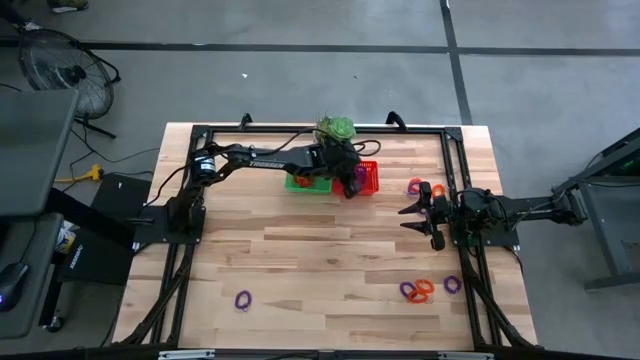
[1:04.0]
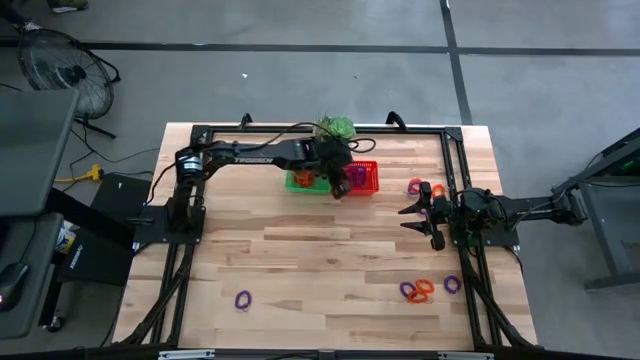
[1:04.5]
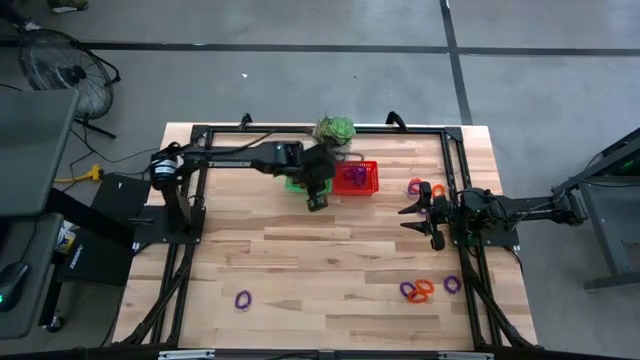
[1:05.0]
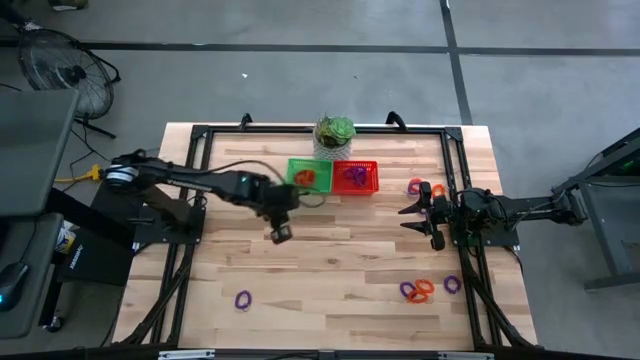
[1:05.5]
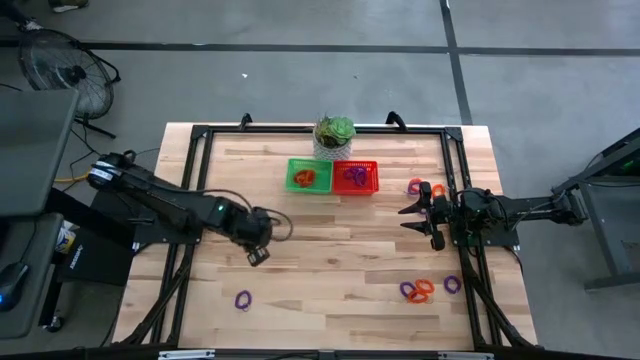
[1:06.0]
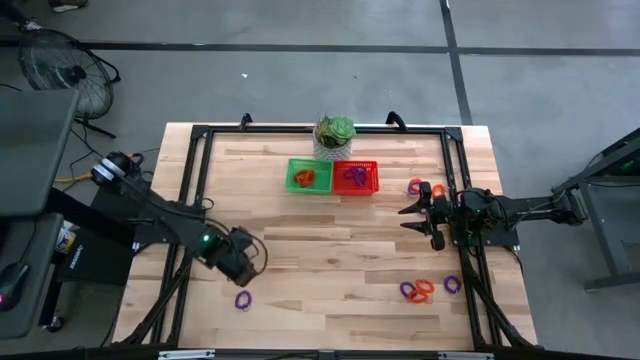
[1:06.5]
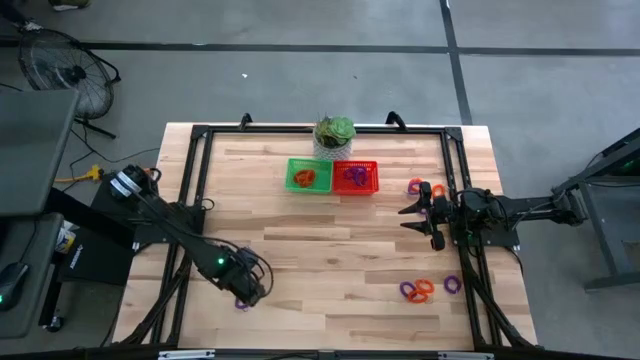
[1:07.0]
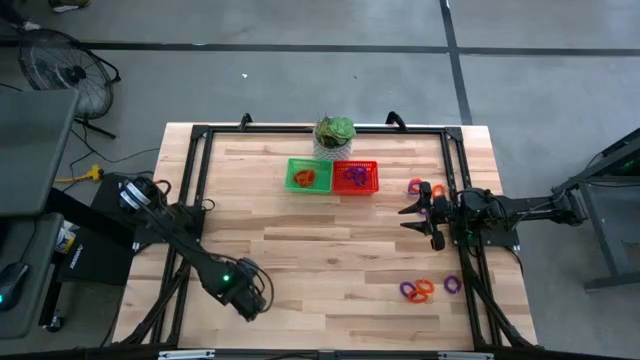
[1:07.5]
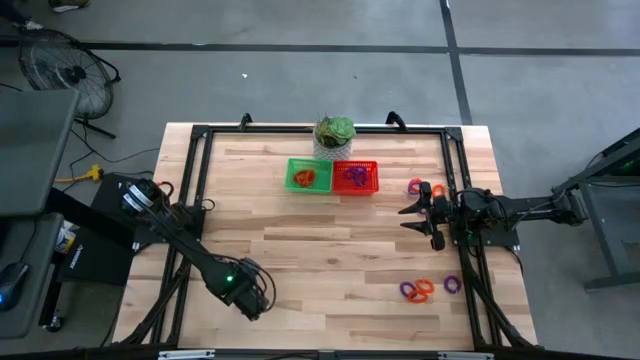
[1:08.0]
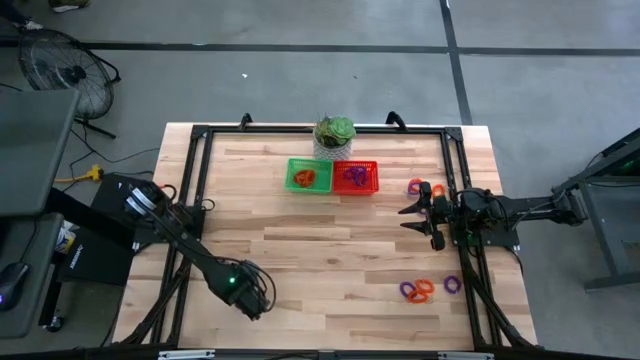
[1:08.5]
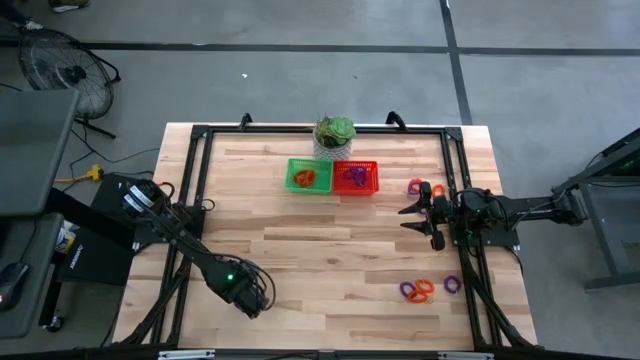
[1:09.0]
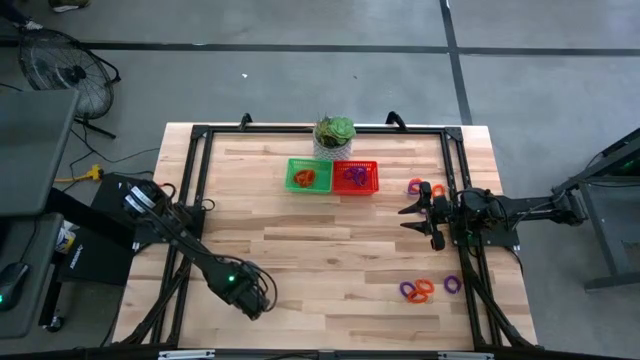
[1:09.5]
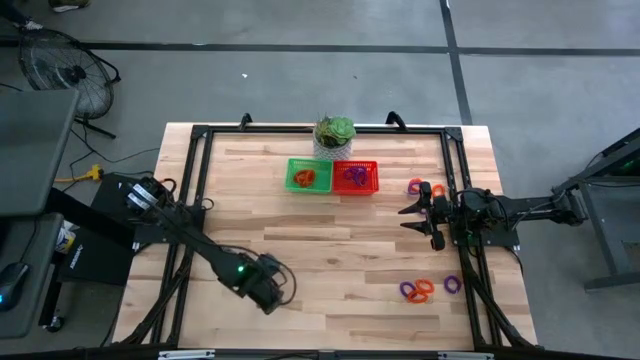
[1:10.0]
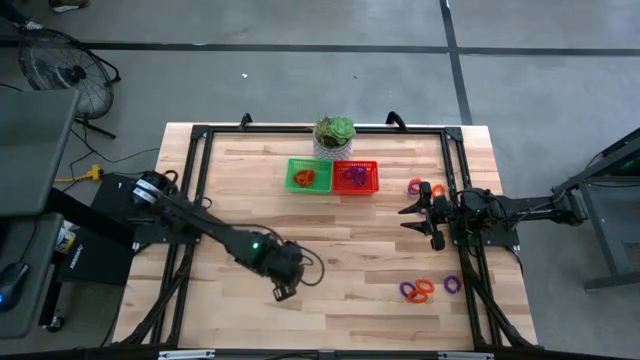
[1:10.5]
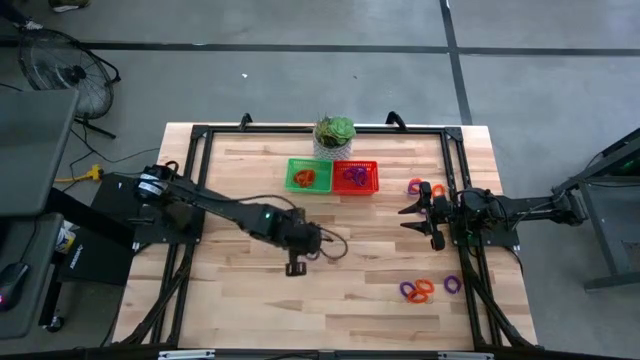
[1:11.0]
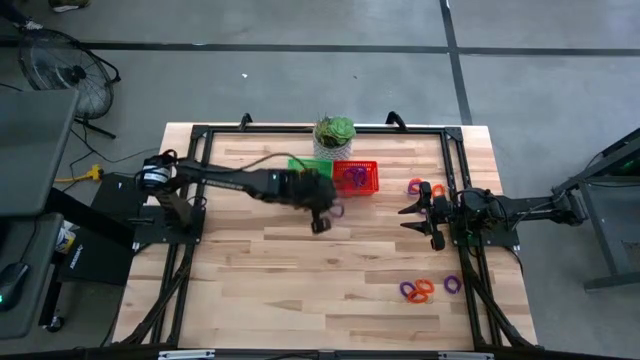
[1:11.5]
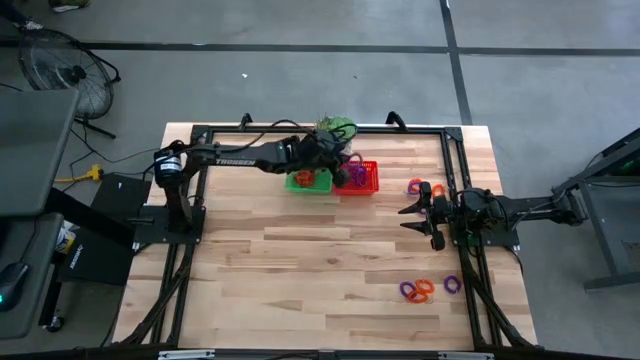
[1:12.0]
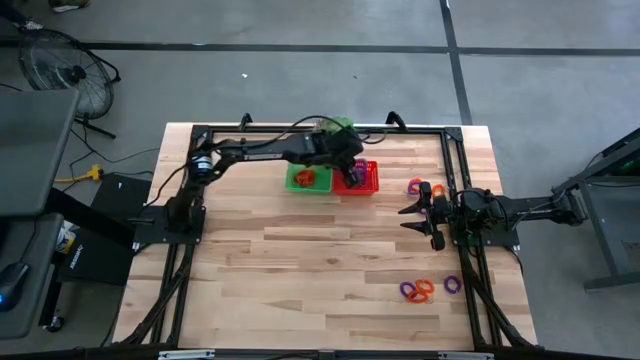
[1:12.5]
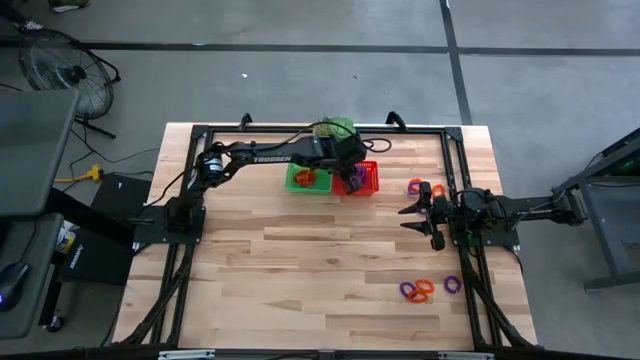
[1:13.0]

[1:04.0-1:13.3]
Task: Sort spring keychains
Put the purple spring keychain into the orange bin

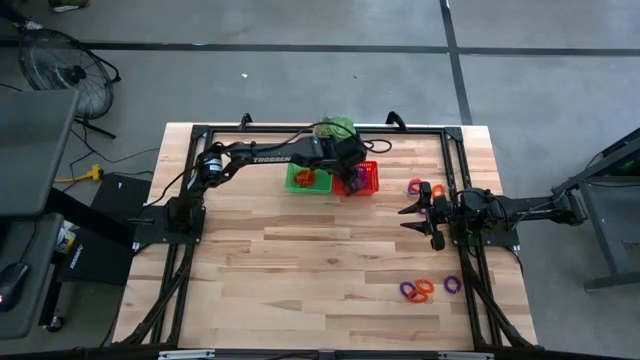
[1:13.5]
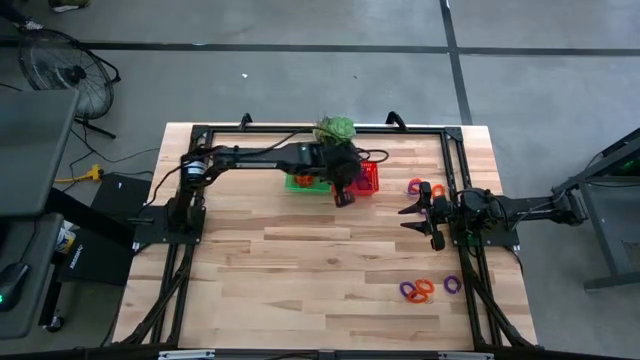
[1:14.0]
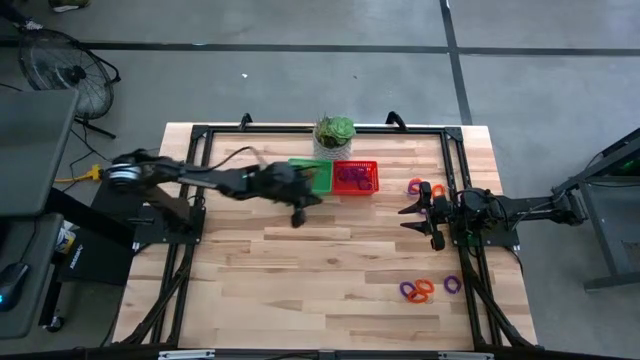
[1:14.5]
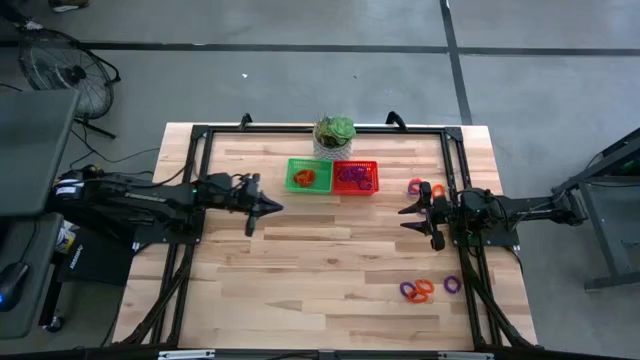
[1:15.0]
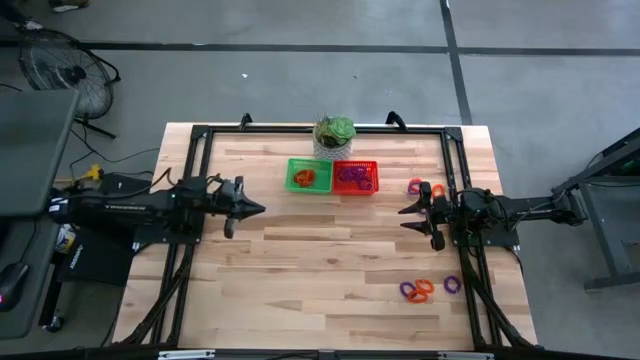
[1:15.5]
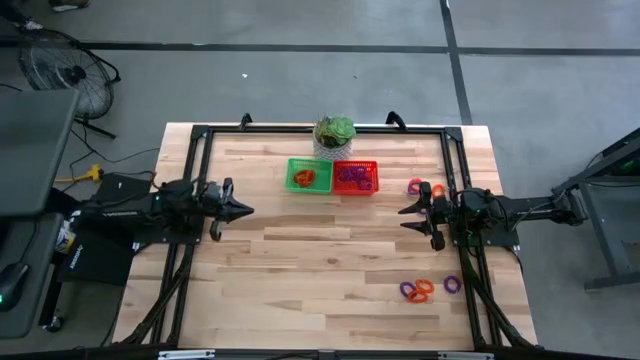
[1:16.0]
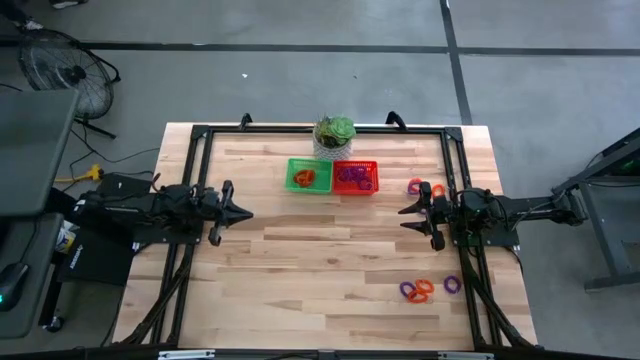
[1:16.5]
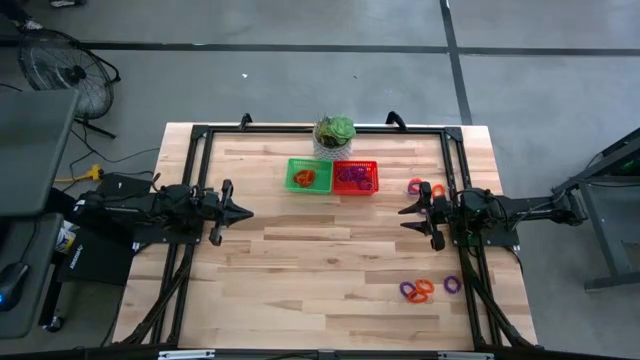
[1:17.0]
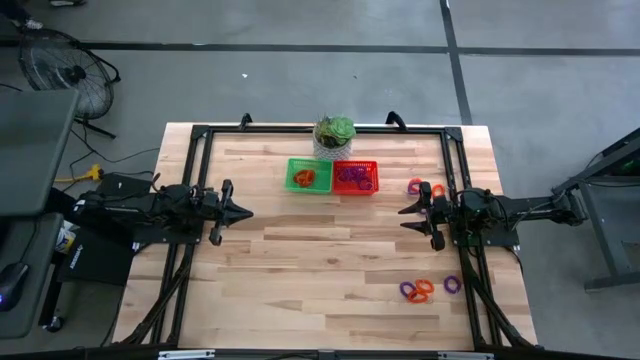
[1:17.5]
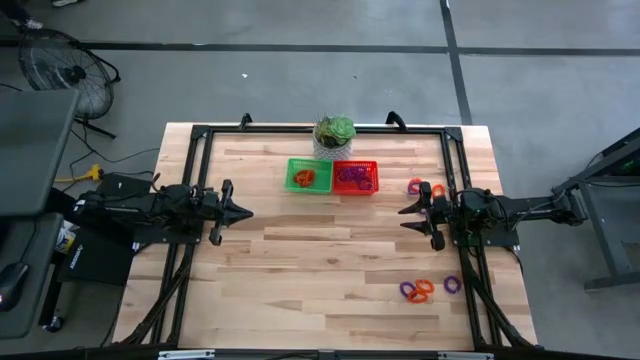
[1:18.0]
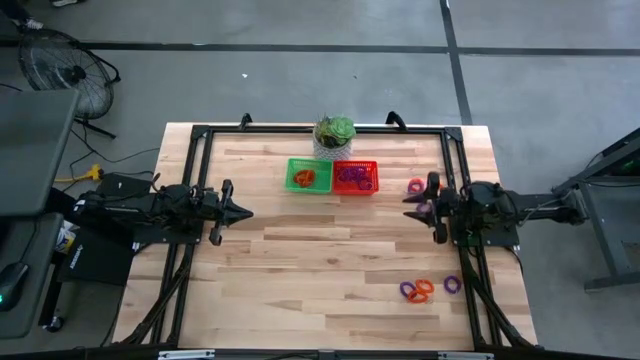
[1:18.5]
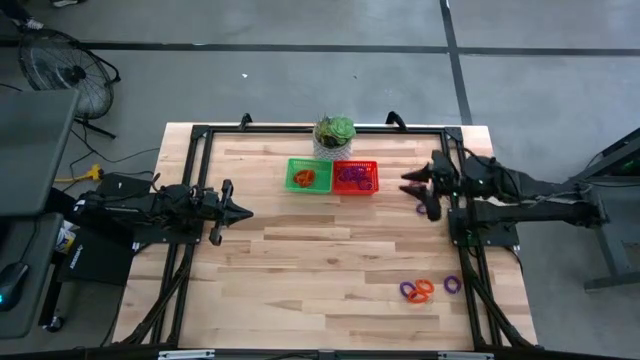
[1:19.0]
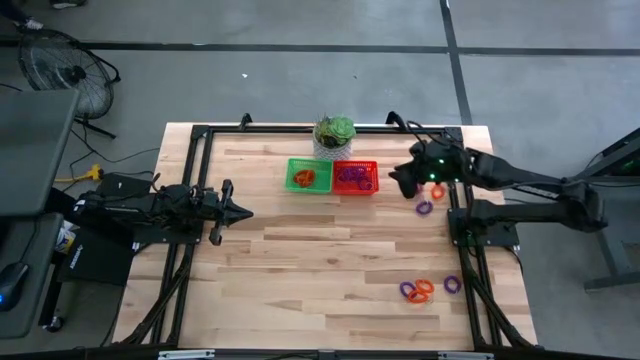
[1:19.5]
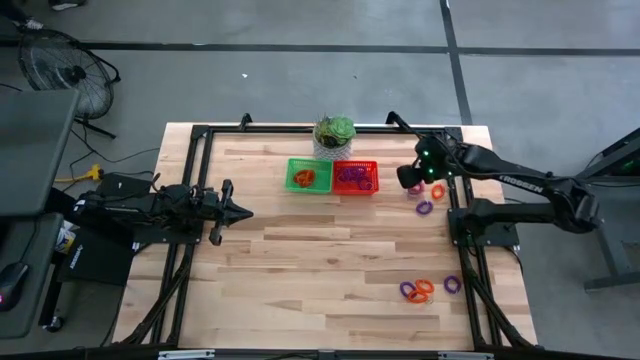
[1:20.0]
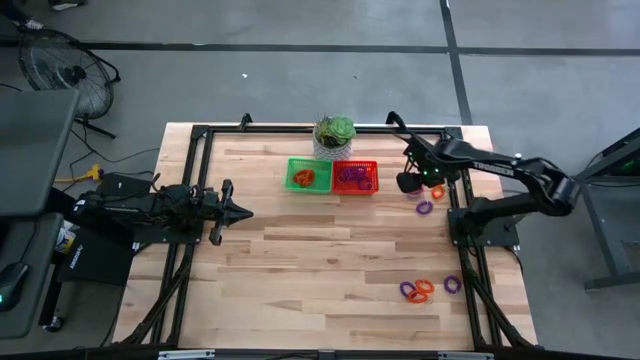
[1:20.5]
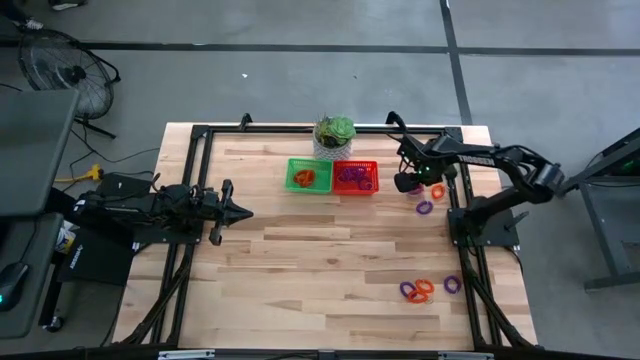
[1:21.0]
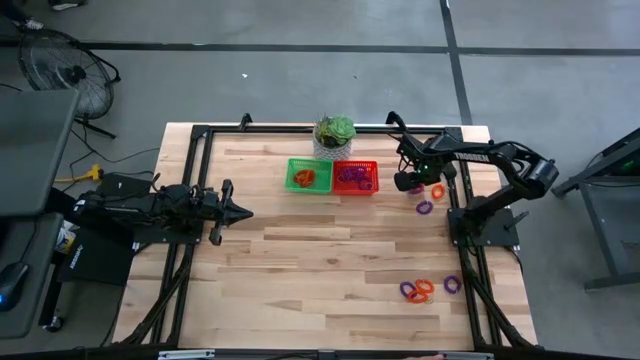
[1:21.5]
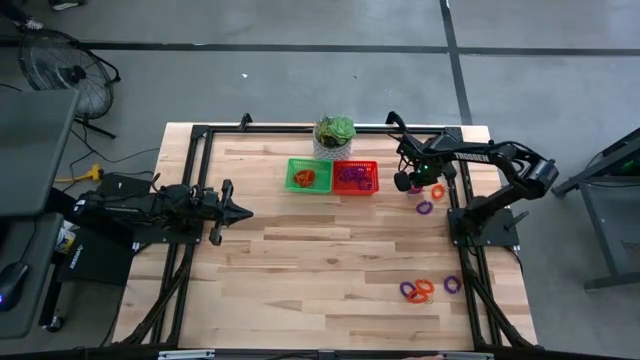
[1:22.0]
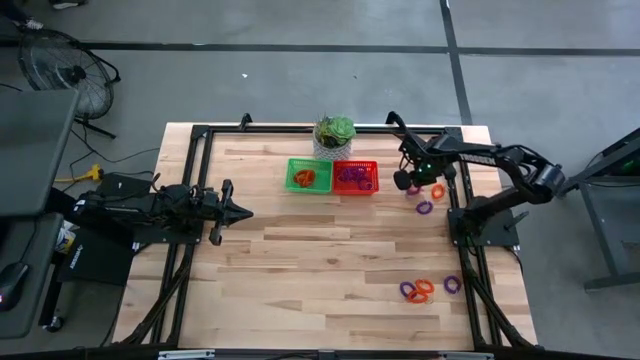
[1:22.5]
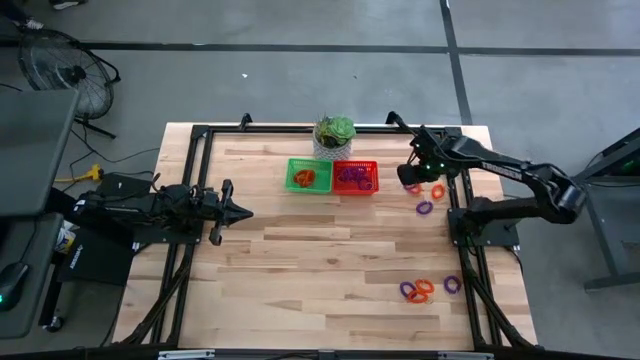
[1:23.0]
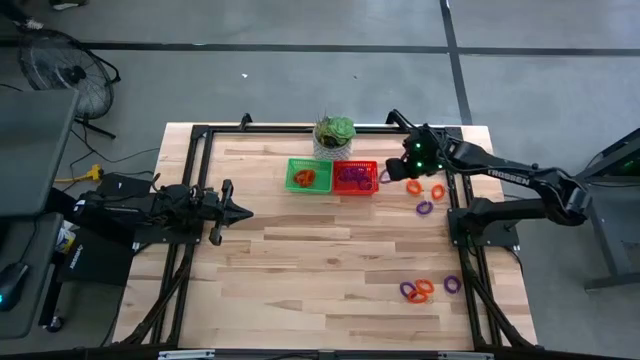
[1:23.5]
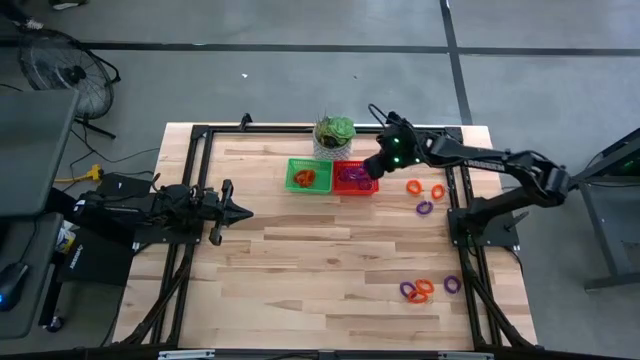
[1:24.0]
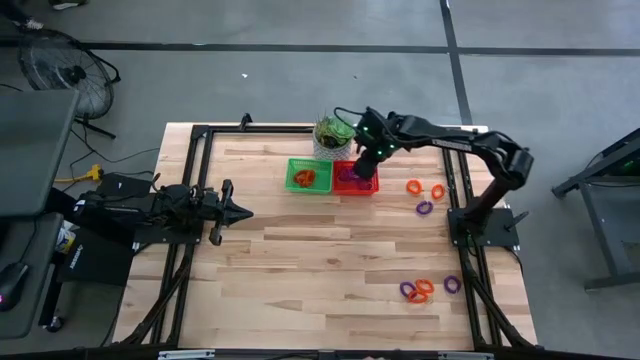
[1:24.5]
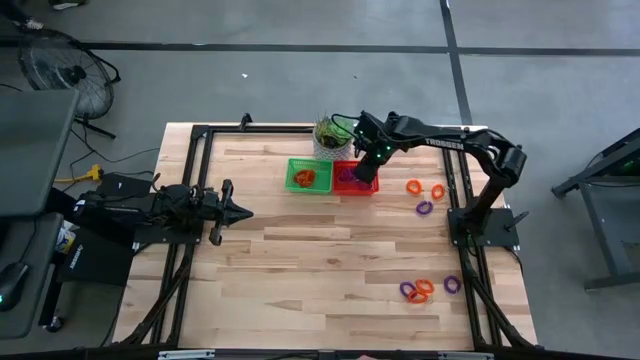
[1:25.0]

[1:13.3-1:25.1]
Put the purple spring keychain into the orange bin

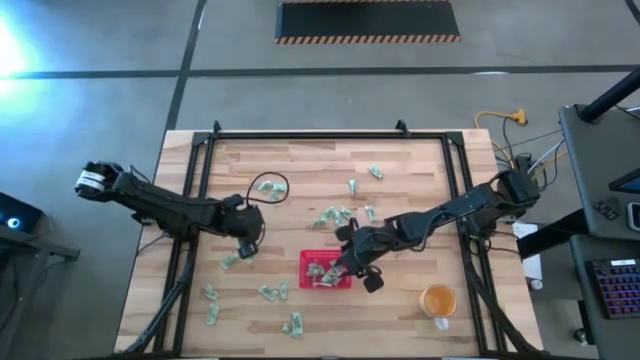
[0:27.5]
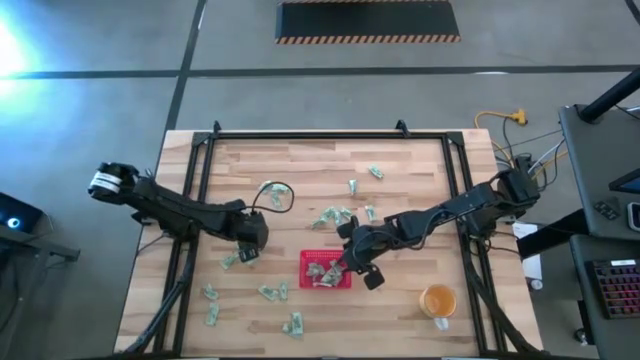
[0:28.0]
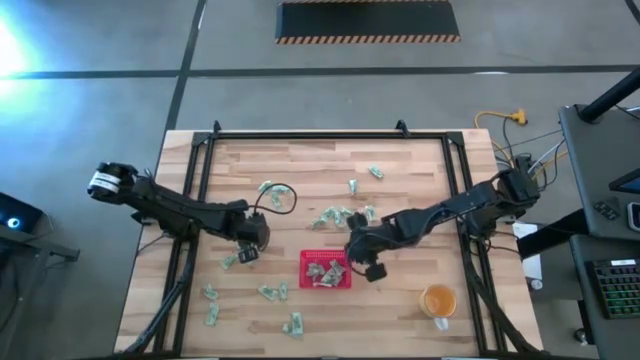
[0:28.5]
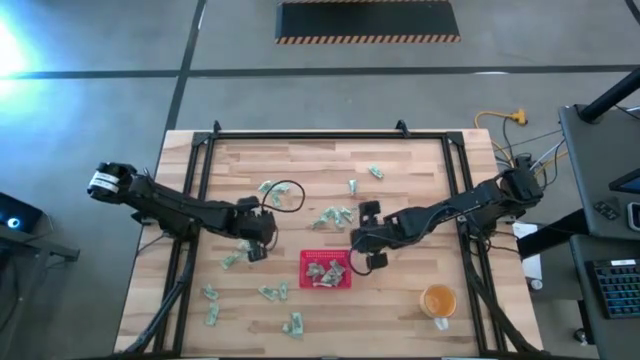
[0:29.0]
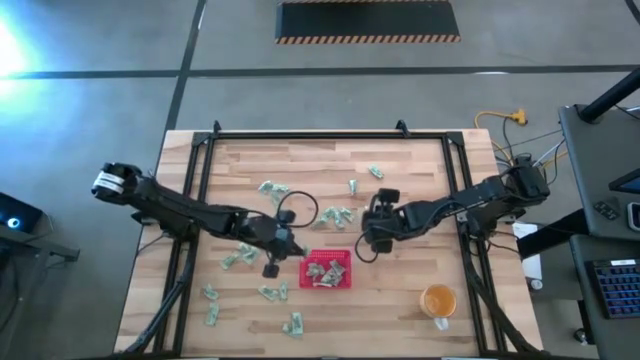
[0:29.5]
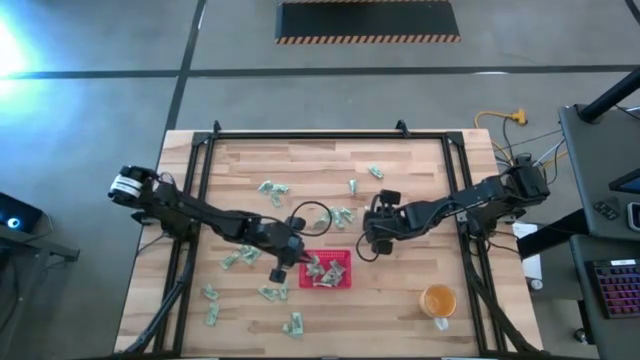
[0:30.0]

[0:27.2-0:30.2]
Task: Pick and place Stevia / Truvia into bins
Put the white stevia packet into the red bin
